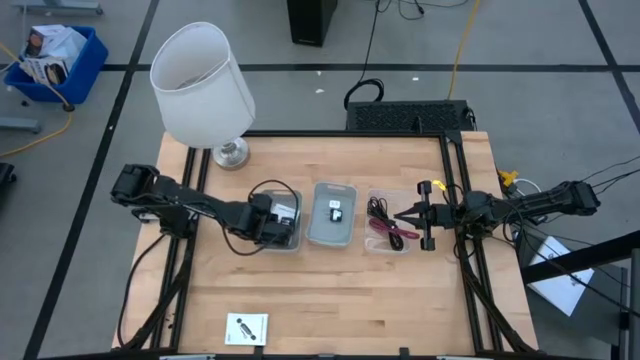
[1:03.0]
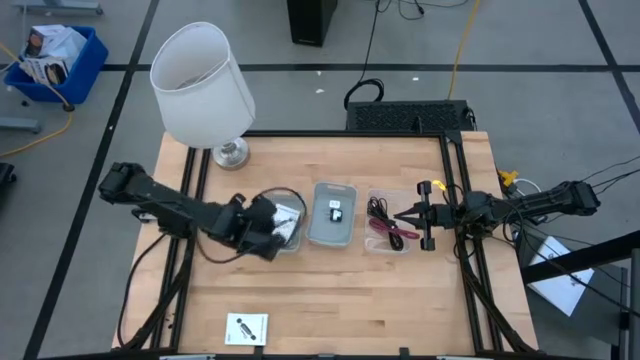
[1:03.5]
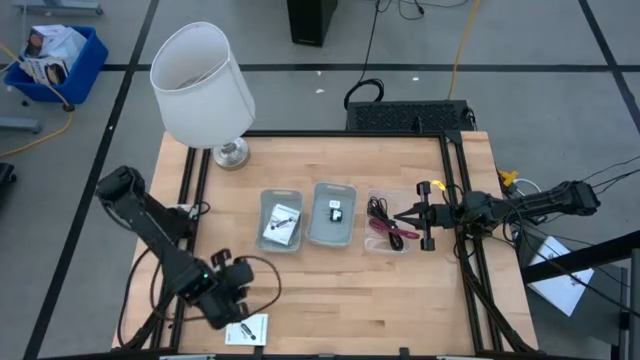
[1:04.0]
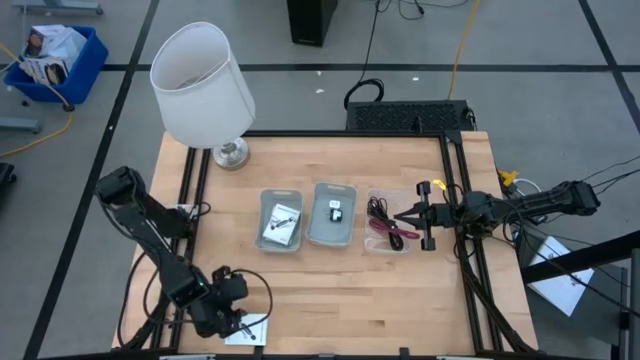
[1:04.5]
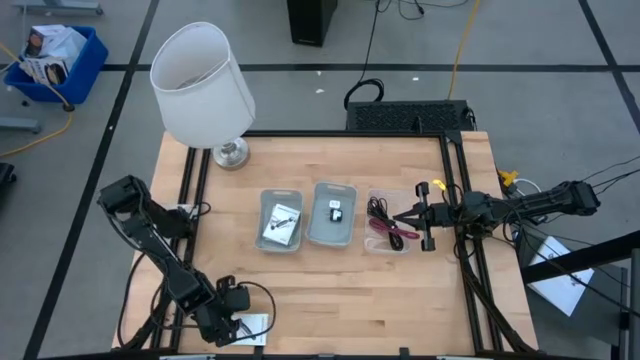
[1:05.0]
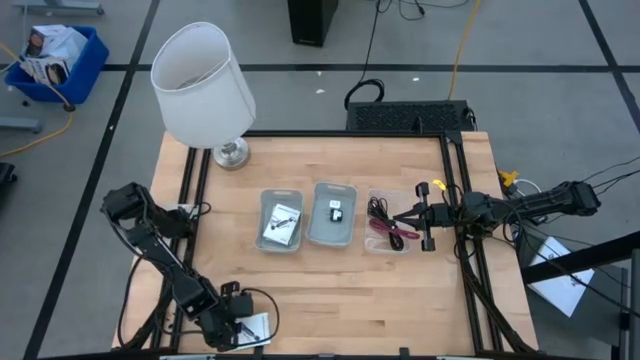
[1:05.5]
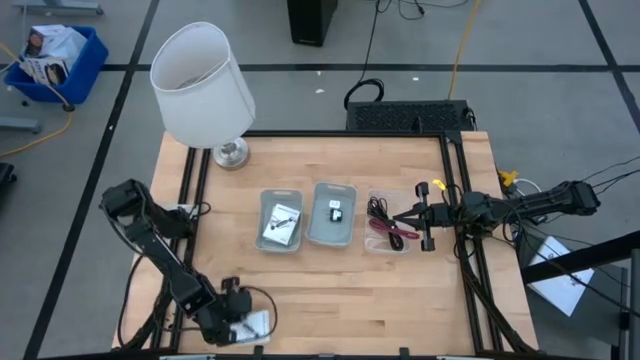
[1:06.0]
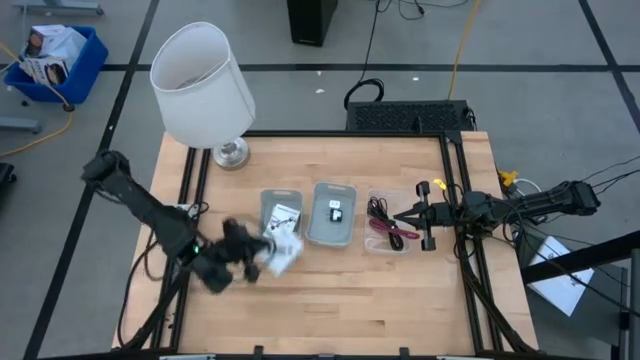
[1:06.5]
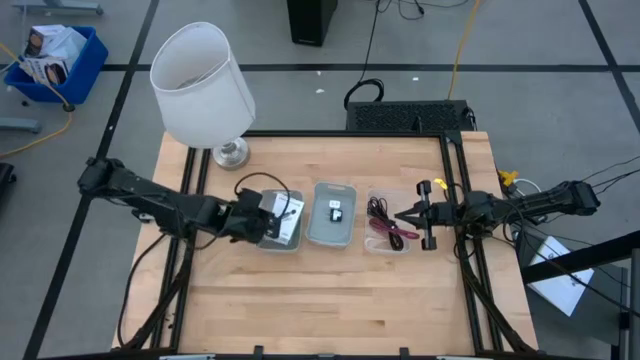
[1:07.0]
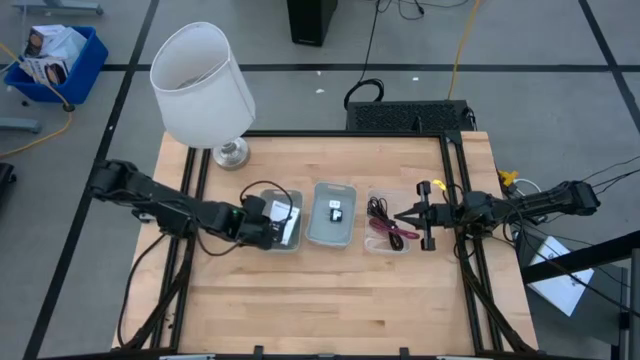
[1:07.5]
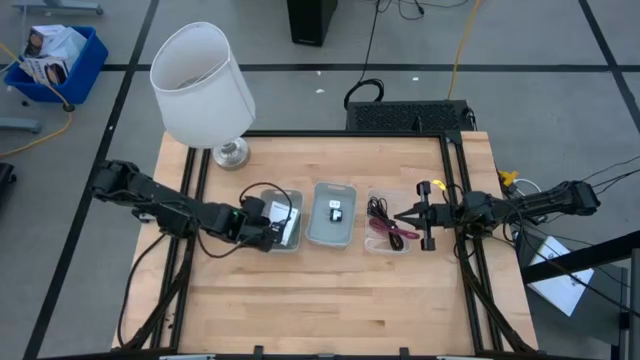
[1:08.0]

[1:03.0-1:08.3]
Task: Pick and place items into bin
Put the card reader box into the left gray bin

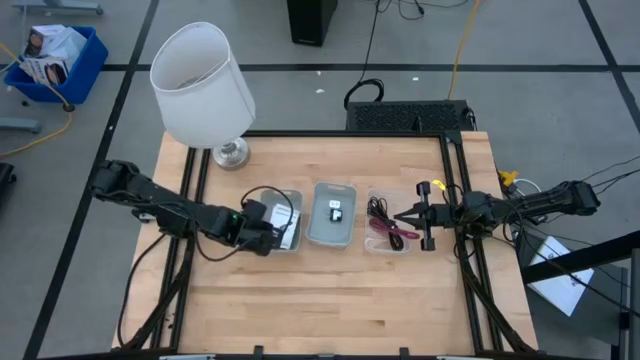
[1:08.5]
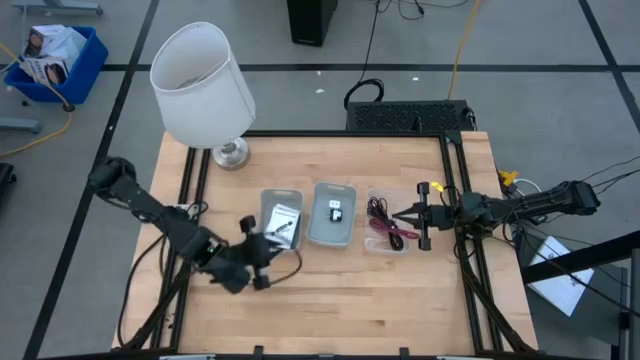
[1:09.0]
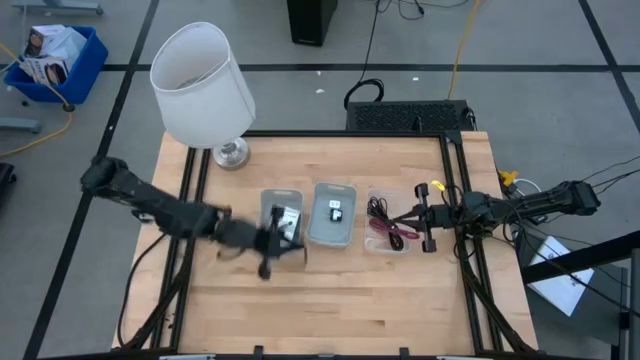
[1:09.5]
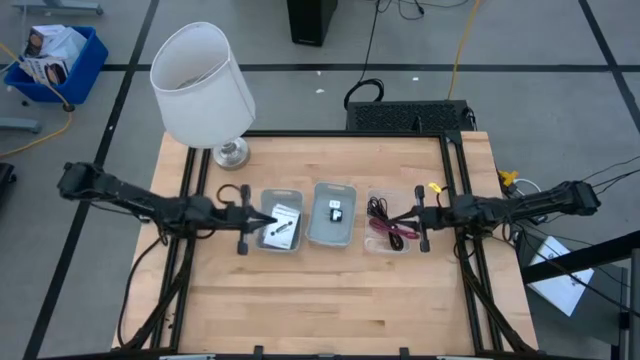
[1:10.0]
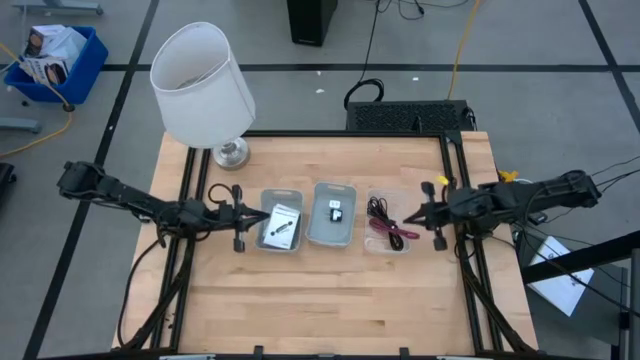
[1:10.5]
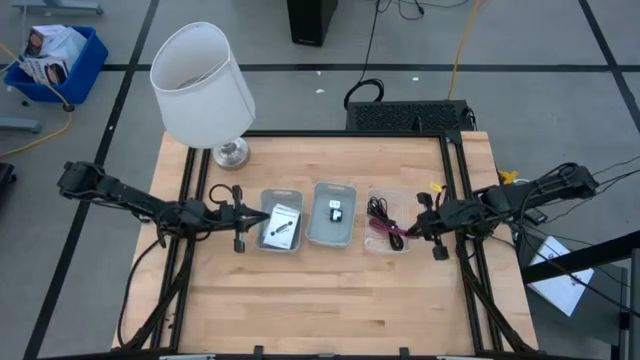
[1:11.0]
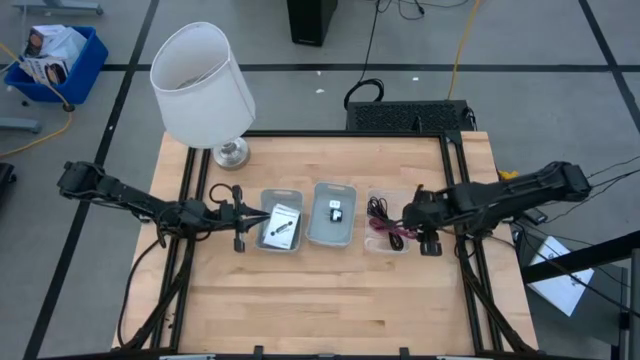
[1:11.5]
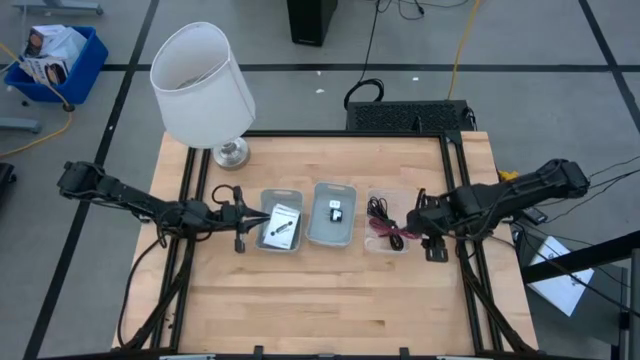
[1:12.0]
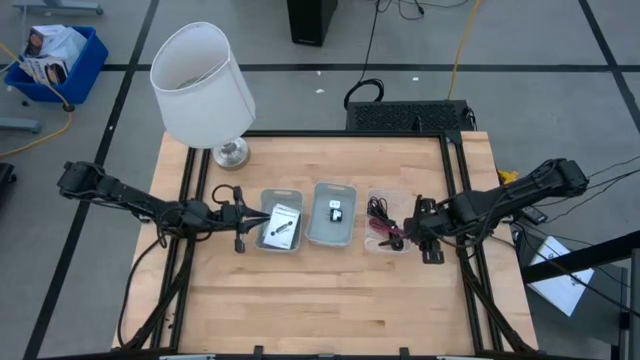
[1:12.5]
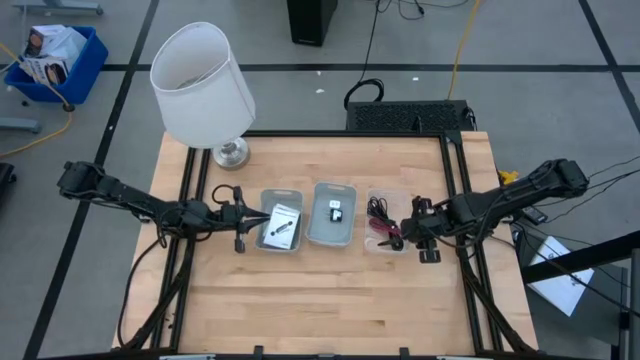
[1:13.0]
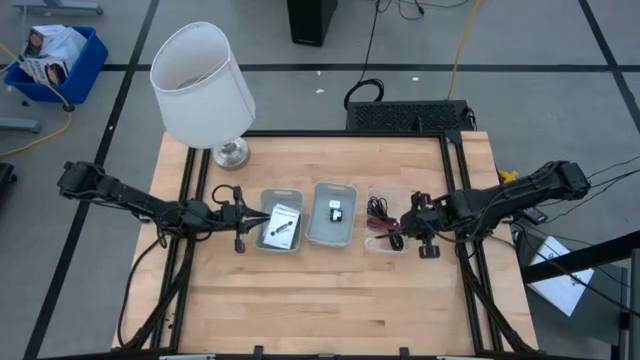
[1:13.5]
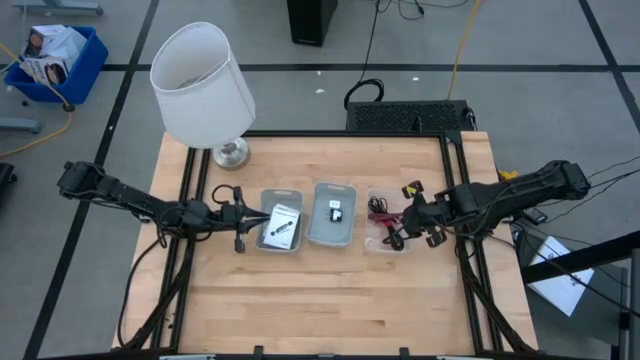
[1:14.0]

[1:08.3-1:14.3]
Adjust the pink charger cable in the transparent bin

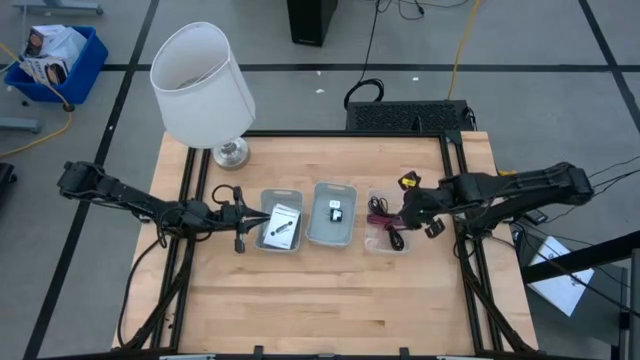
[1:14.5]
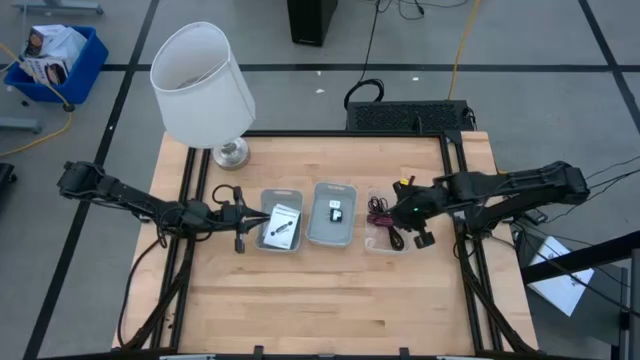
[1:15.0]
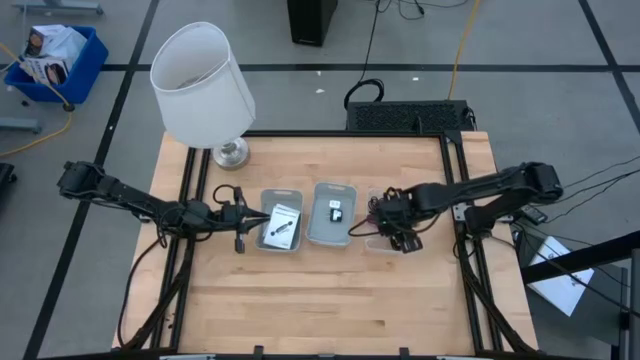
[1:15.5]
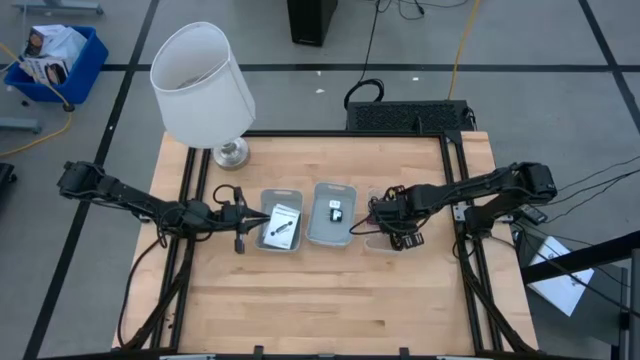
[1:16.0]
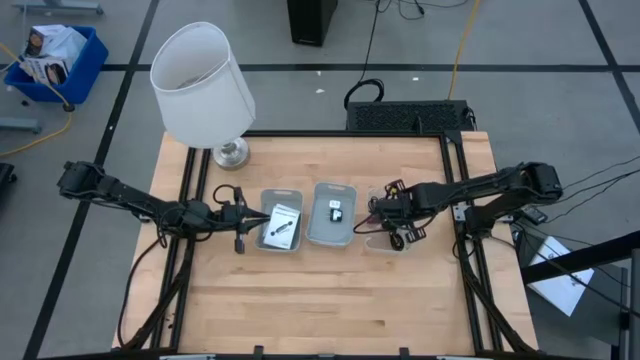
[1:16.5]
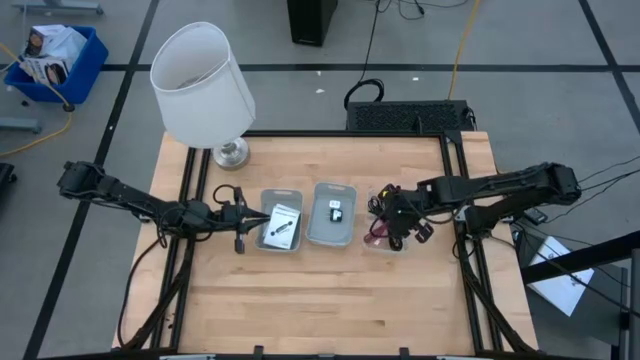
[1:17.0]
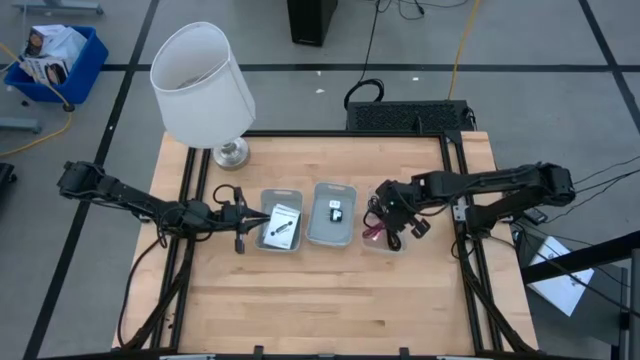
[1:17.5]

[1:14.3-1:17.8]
Adjust the pink charger cable in the transparent bin

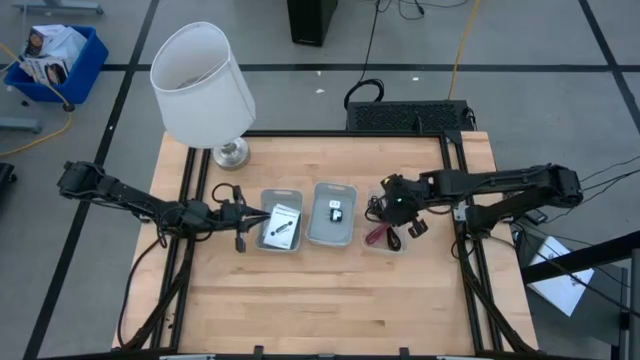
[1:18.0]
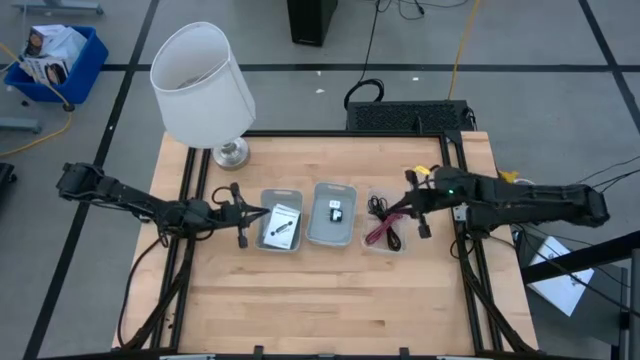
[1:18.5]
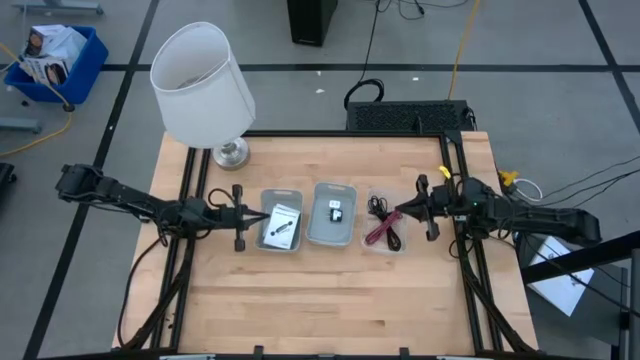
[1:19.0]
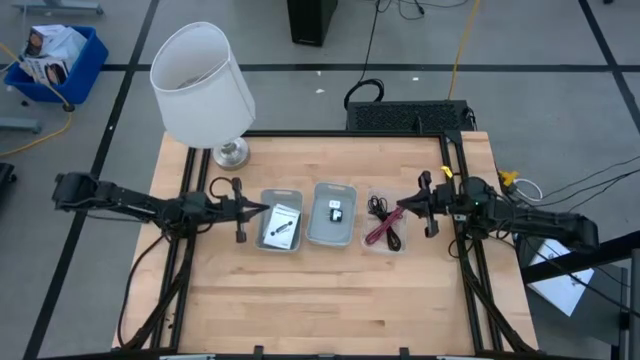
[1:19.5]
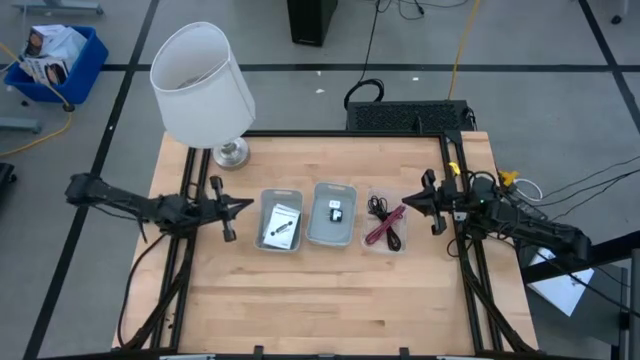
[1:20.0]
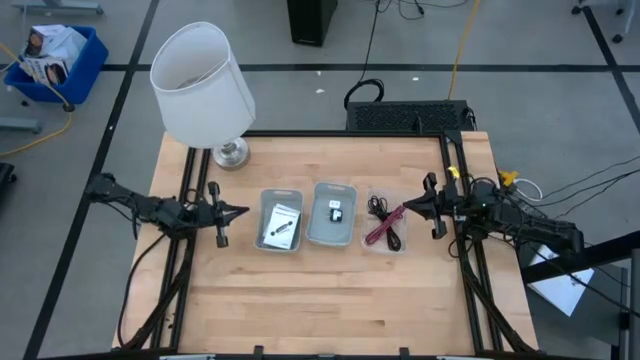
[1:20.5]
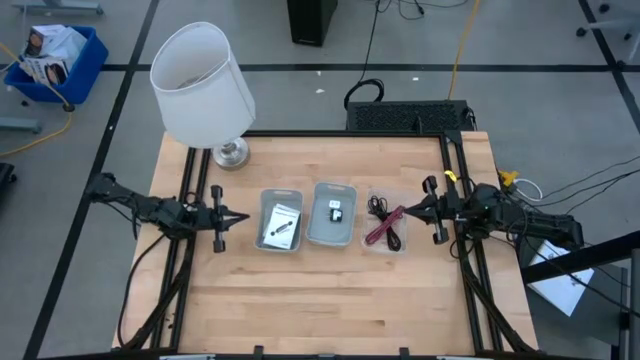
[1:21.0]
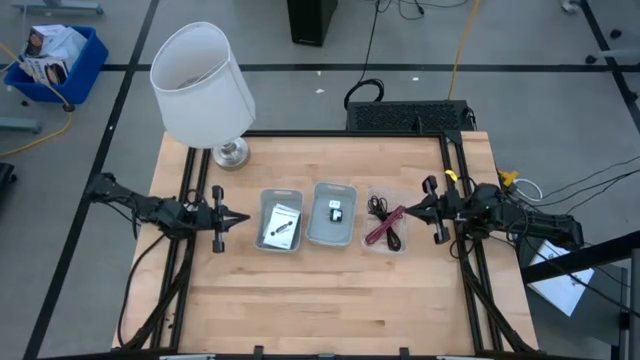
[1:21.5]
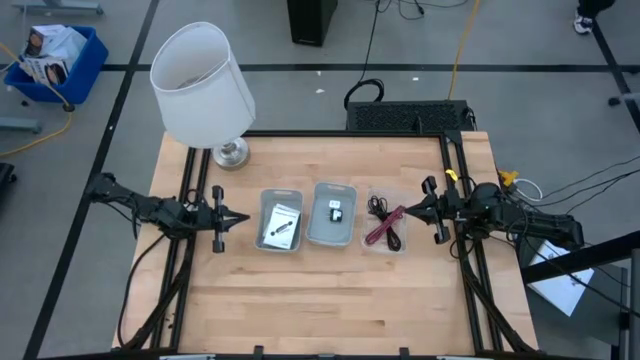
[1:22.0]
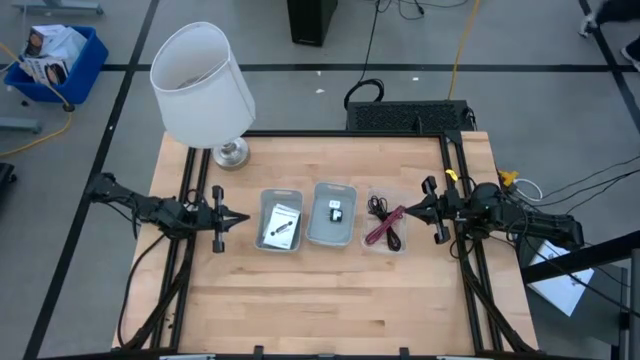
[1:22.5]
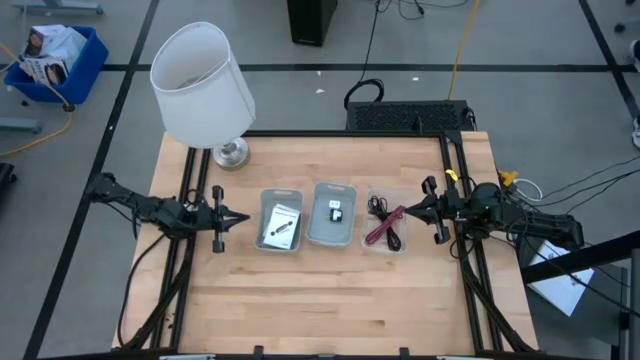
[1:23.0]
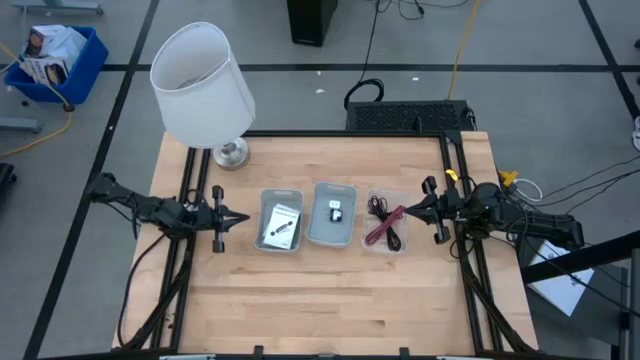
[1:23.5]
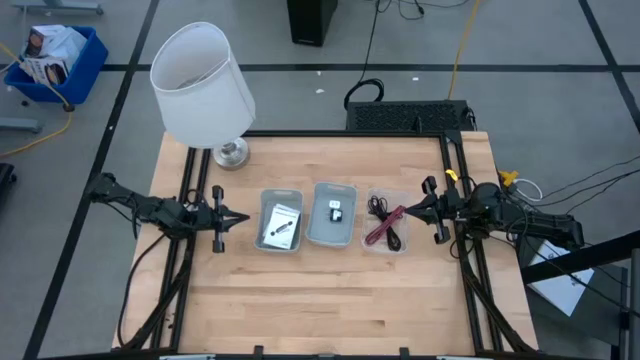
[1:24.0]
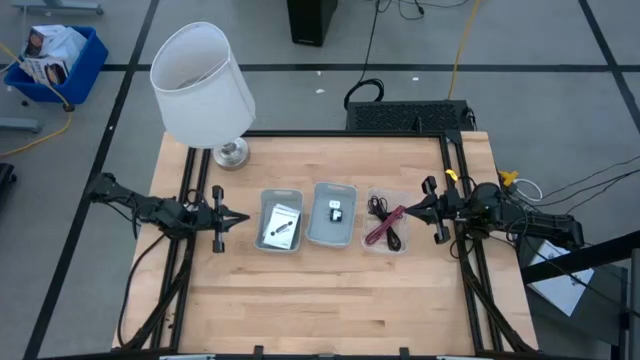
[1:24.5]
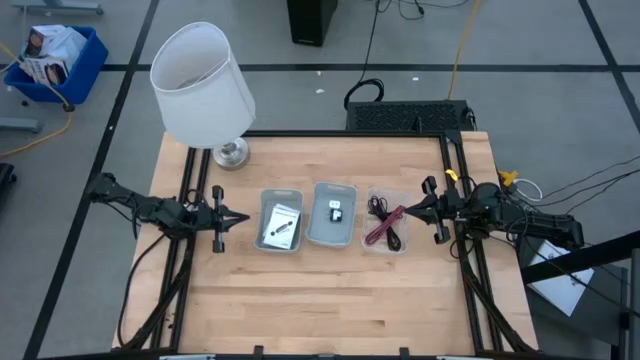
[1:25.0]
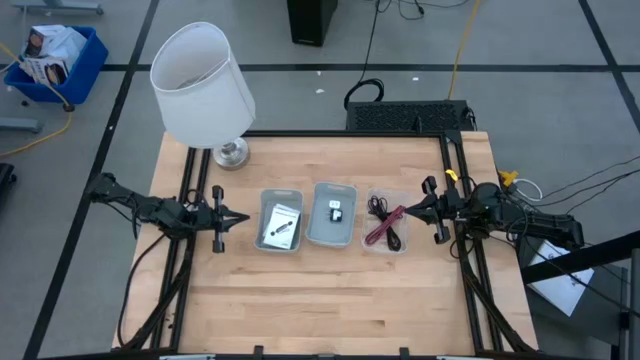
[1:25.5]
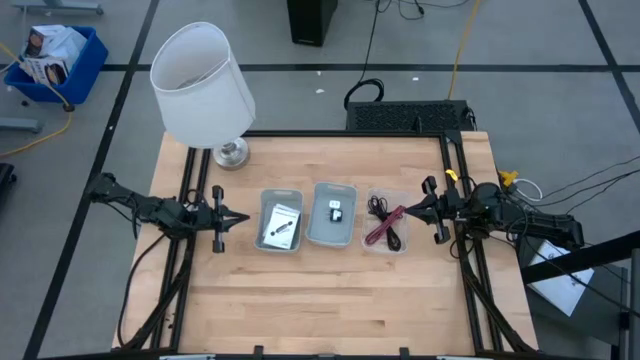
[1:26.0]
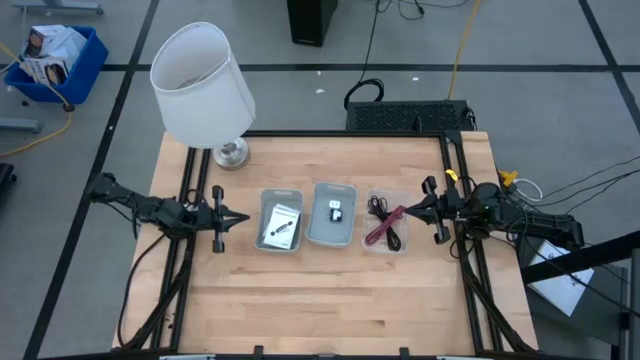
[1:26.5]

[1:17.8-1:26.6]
Return to Home Position
